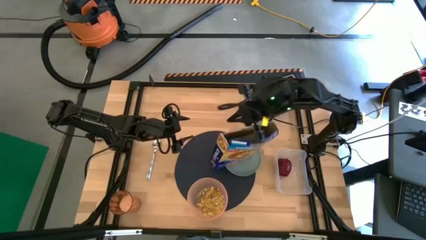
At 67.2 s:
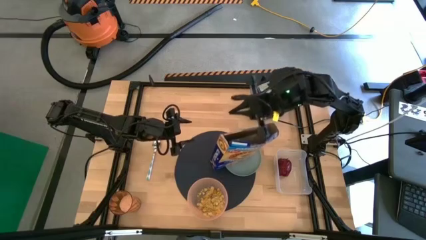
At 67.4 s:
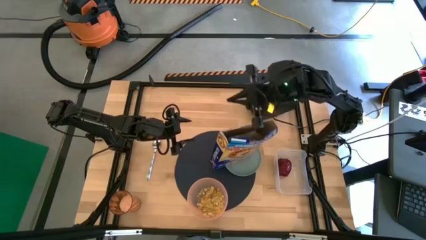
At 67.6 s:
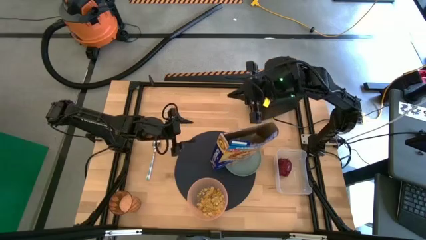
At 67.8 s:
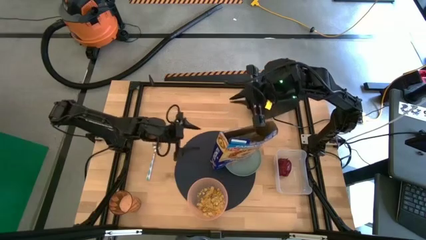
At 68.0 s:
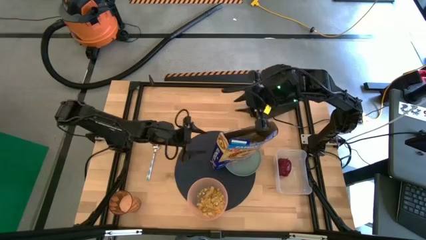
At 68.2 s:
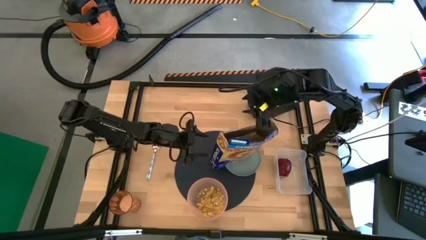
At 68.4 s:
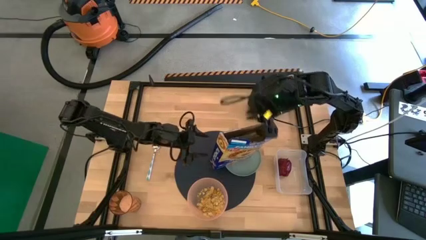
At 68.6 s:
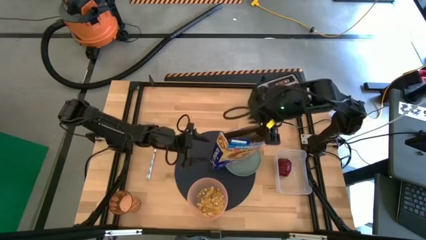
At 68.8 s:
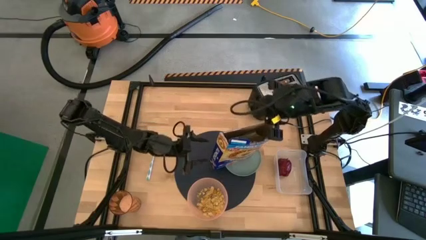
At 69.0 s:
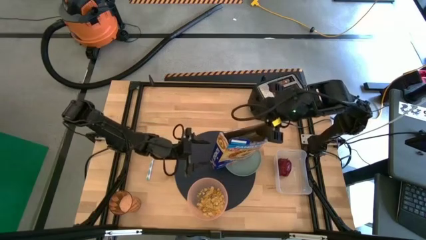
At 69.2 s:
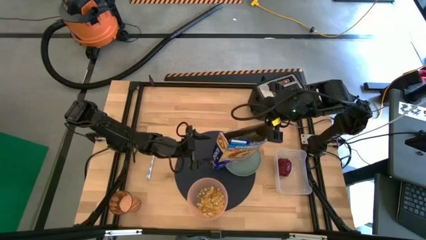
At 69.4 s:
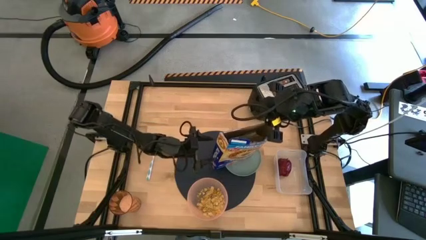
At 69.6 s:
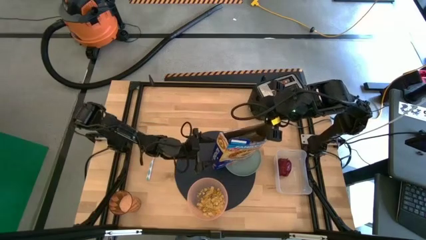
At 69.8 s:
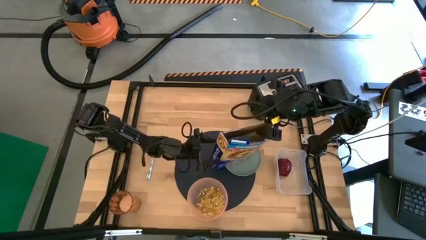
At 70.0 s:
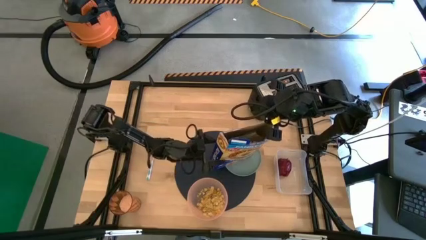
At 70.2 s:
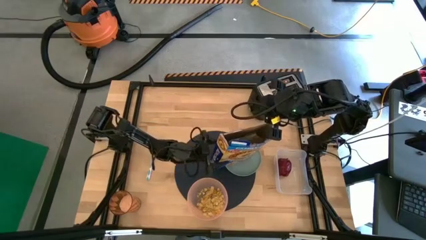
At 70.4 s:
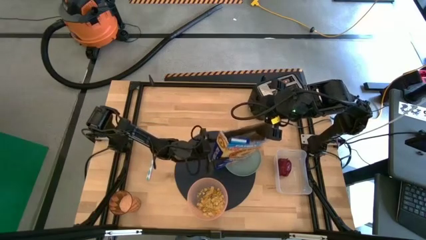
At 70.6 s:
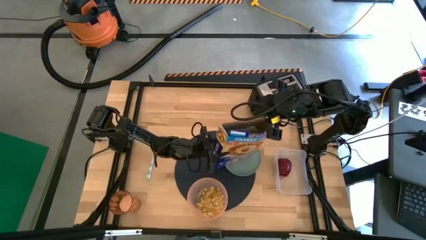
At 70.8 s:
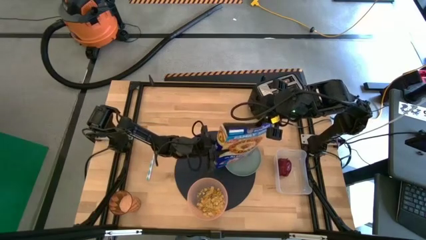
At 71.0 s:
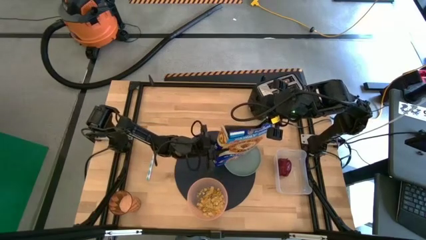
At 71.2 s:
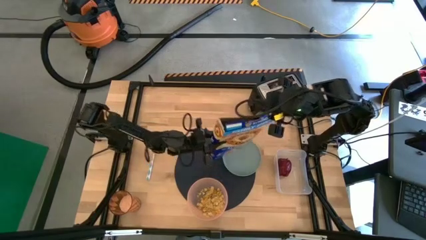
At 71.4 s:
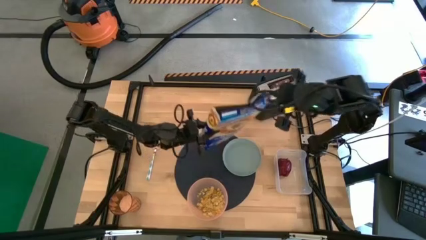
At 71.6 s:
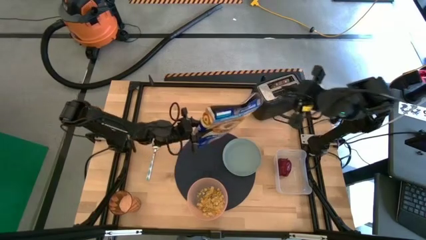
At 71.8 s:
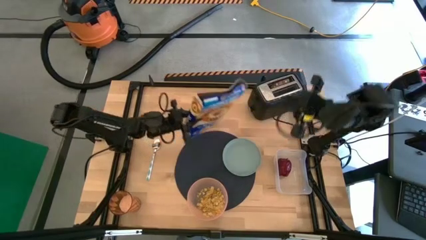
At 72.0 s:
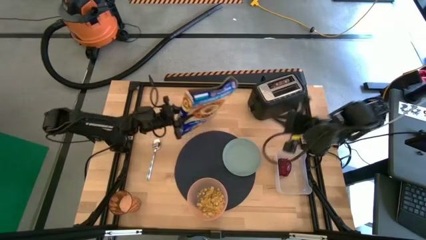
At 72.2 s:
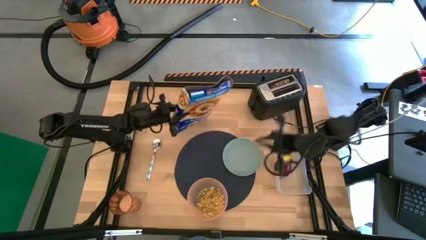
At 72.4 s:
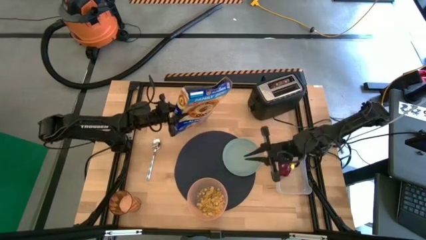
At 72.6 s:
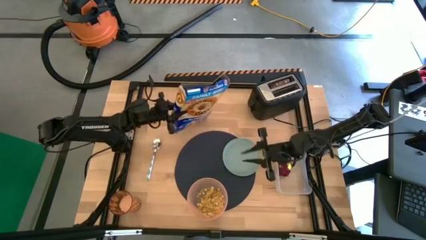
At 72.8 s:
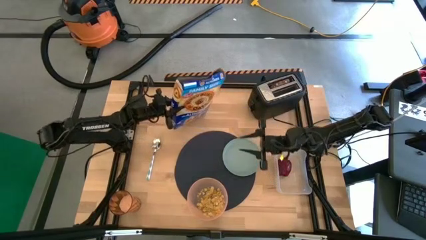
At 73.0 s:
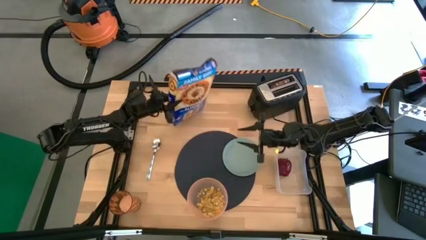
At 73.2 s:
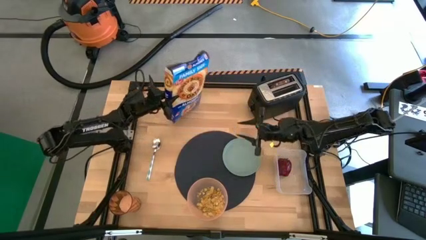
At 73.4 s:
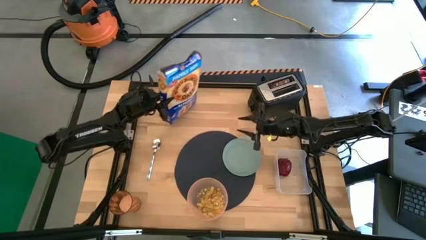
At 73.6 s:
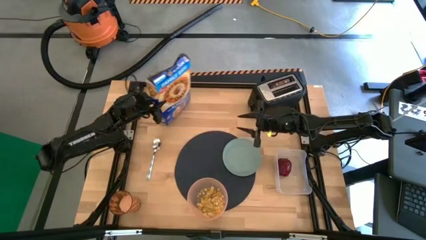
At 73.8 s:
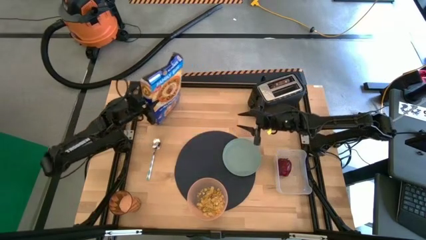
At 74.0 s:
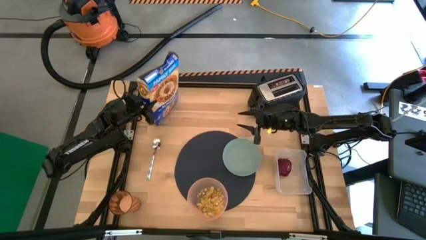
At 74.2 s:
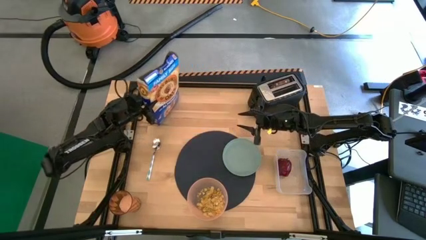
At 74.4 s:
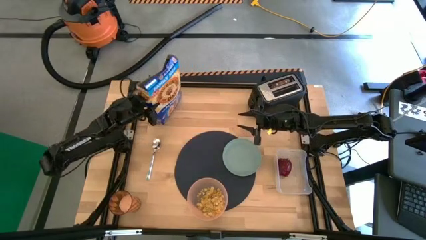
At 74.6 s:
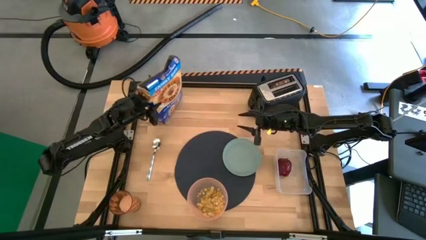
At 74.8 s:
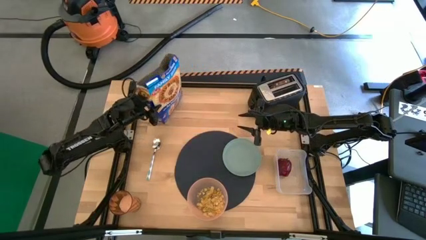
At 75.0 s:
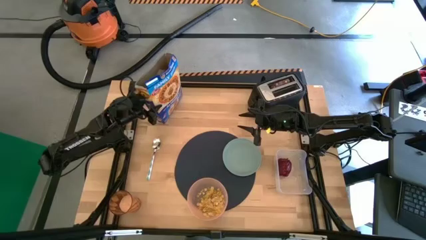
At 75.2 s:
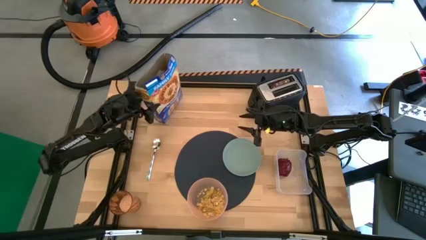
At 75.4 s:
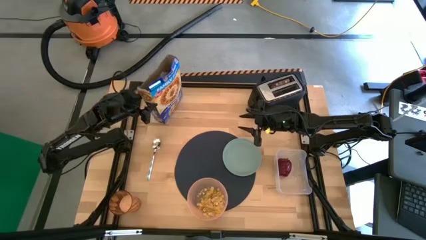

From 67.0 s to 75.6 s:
Task: Arrange a breakfast setting
Pour the cereal from the yellow cereal box into the pink bowl

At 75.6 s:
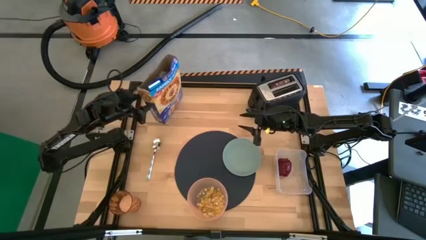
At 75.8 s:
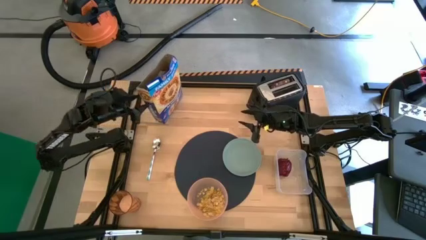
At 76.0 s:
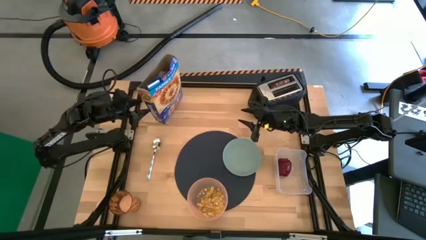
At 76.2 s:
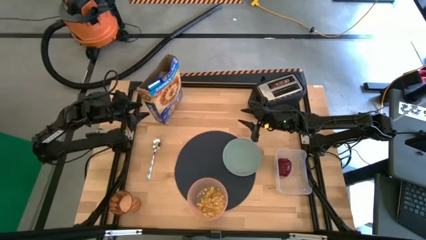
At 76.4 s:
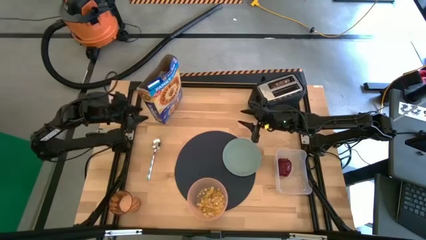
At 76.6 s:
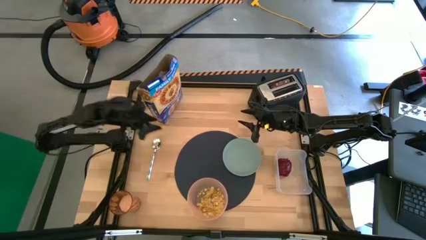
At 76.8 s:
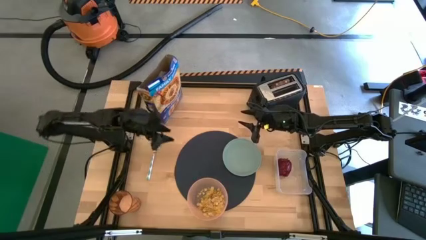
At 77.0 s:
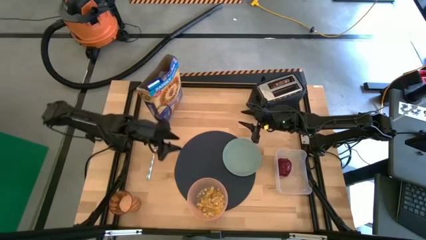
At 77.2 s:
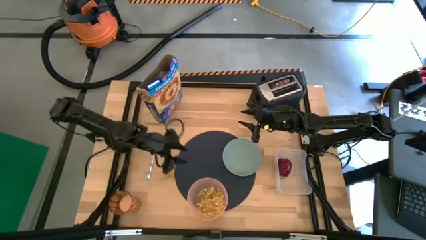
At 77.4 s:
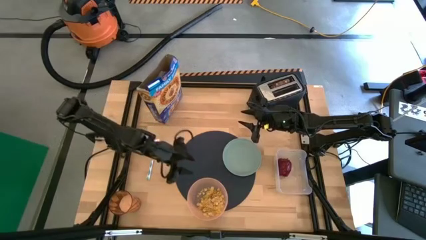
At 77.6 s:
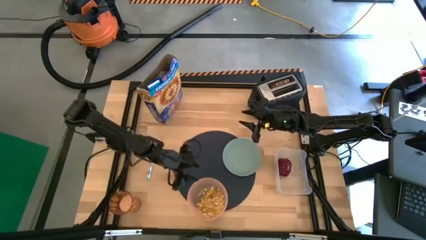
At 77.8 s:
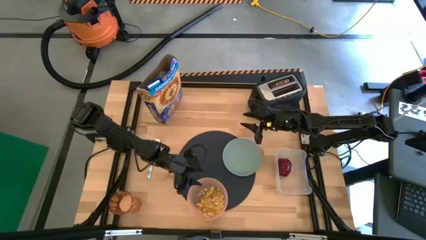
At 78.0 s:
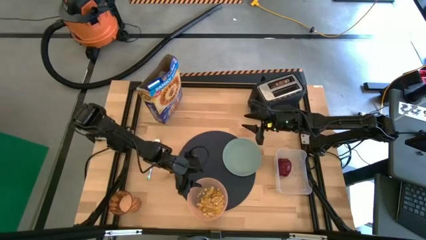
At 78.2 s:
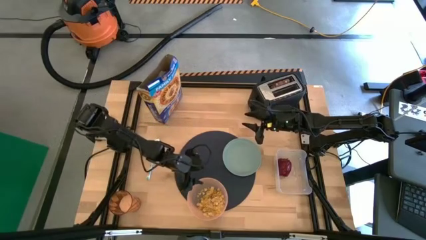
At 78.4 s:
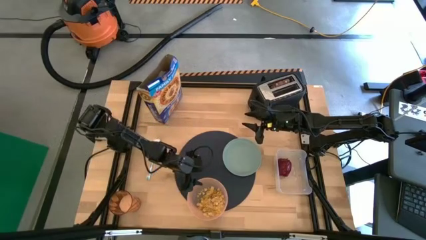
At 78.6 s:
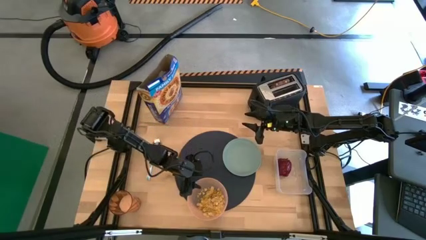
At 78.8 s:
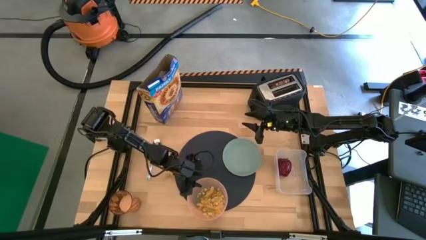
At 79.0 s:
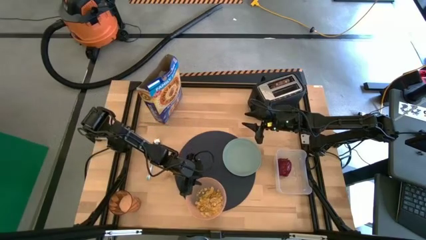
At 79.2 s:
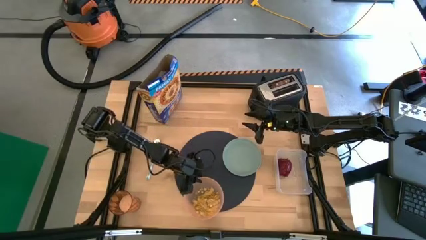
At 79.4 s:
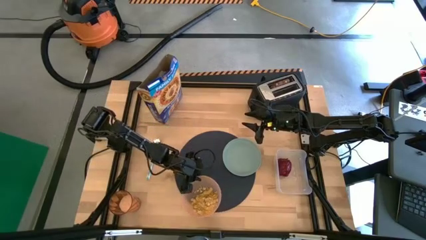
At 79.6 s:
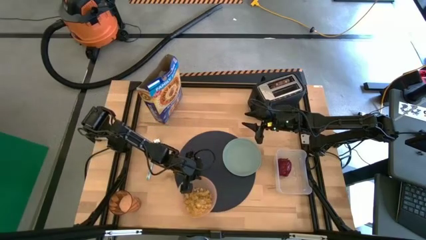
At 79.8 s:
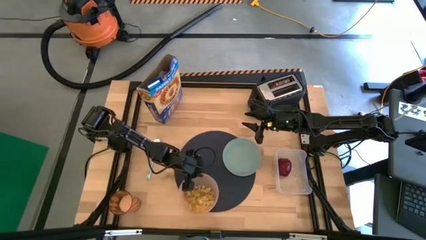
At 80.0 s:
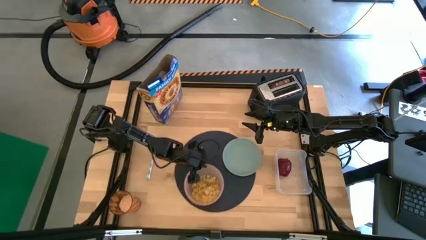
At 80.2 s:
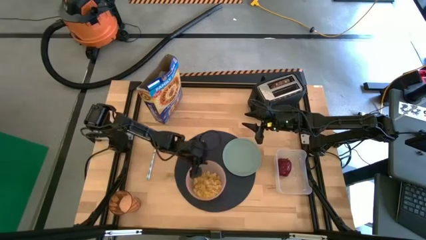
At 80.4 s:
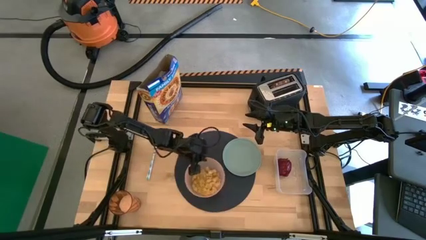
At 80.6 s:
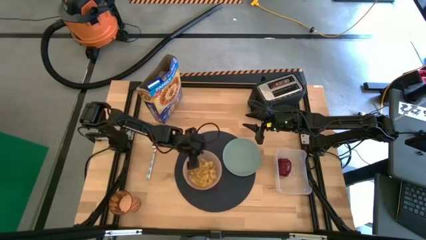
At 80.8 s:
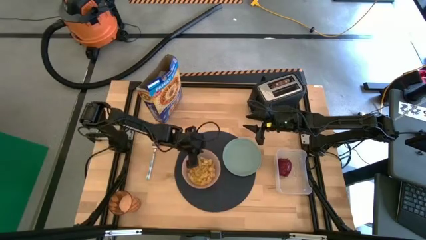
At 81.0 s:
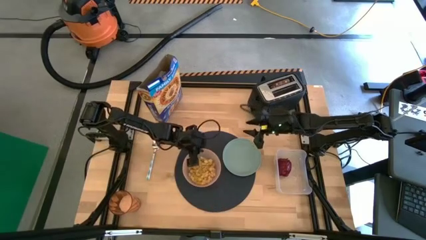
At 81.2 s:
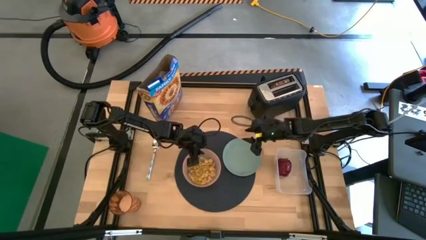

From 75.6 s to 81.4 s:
Adjust the pink bowl on the placemat

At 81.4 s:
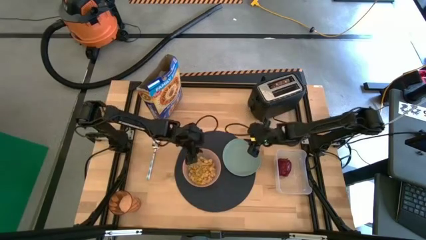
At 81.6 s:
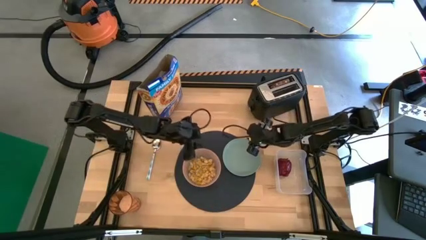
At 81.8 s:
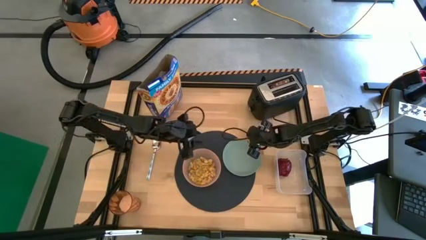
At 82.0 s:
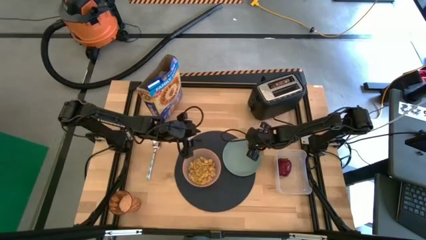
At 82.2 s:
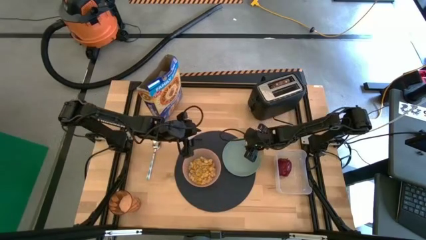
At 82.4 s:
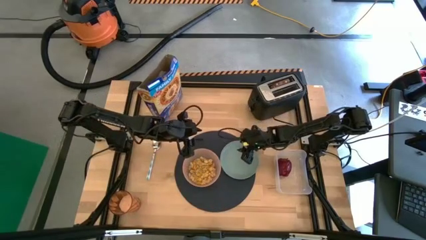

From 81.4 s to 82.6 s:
Adjust the light blue plate on the placemat
